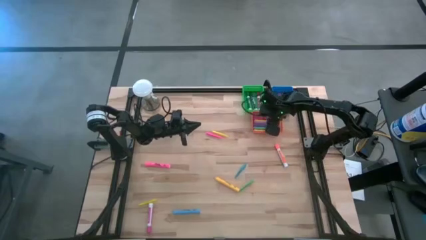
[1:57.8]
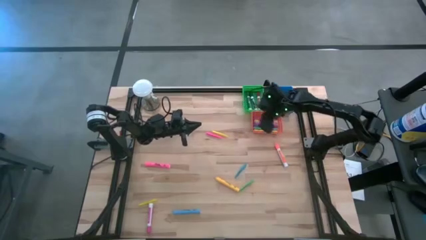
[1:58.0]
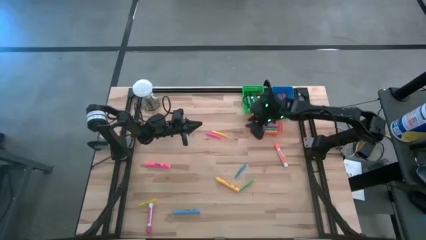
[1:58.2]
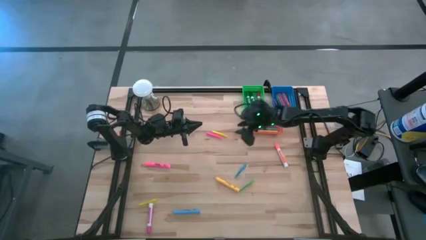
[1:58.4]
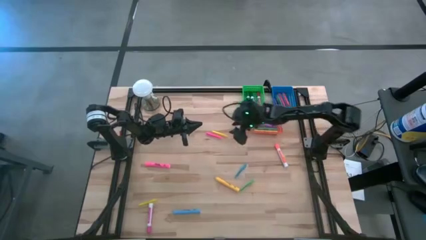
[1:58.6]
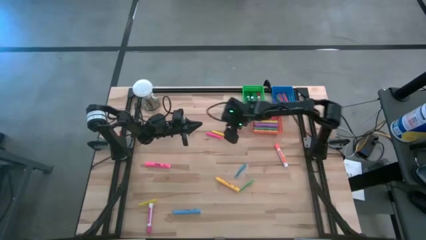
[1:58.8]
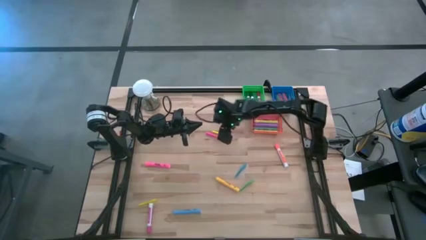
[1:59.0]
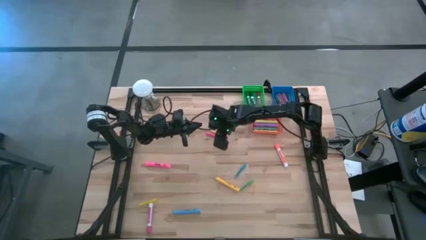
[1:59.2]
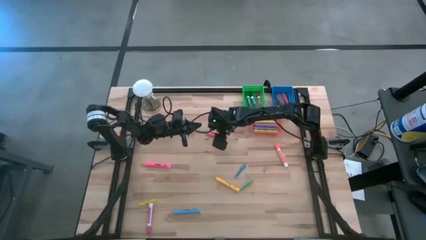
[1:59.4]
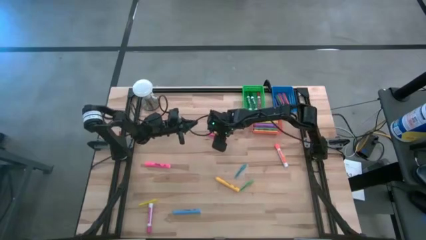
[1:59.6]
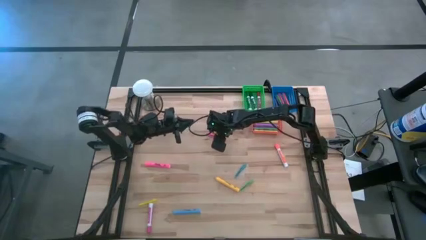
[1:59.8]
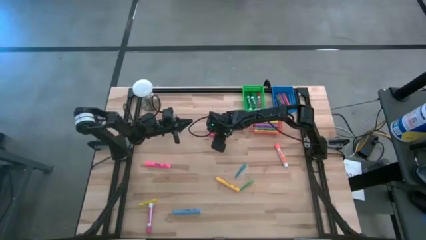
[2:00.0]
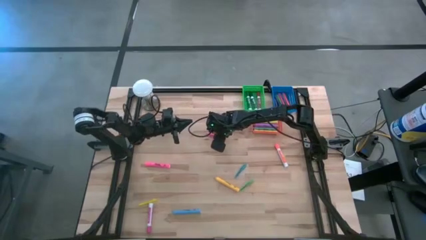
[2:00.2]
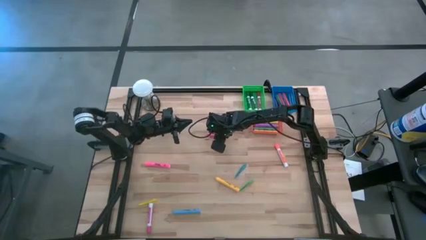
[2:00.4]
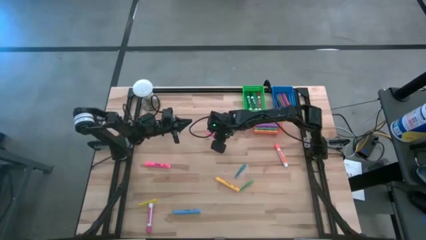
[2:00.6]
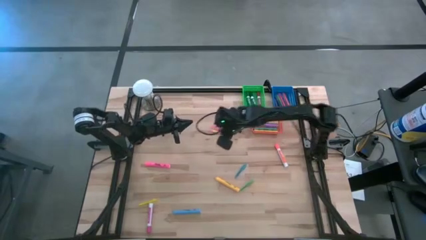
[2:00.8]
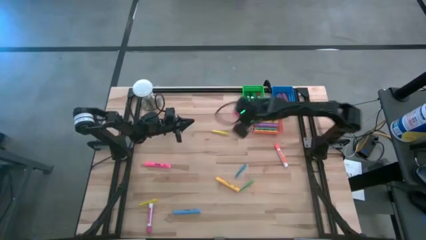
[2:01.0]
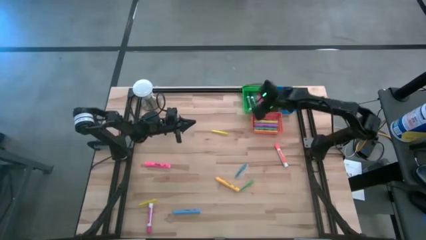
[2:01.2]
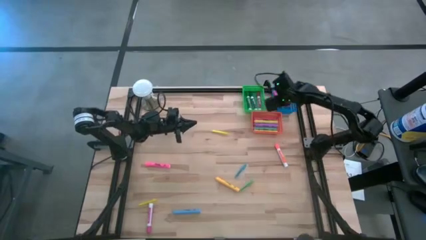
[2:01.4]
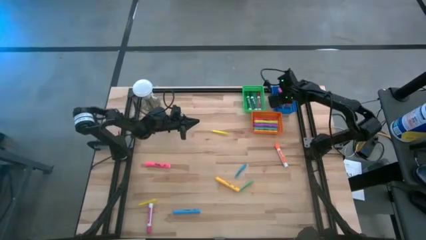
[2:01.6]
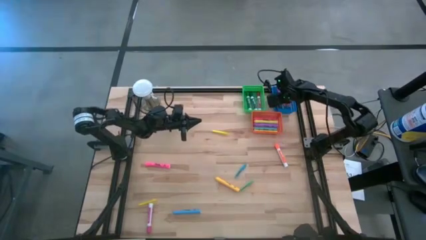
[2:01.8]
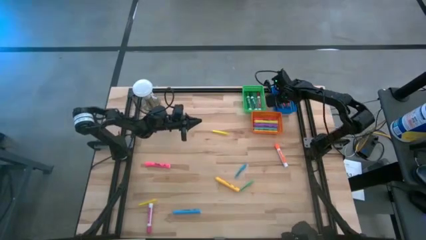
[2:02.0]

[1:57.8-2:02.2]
Task: Pick & Place Markers
Put the pink pen into the blue bin

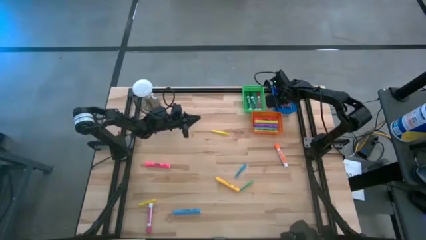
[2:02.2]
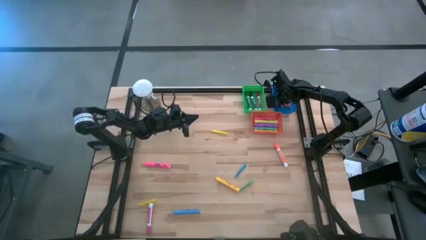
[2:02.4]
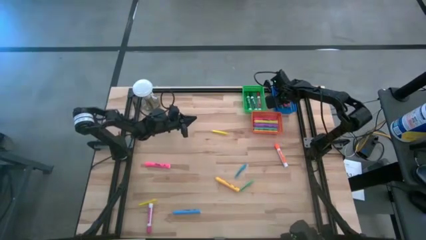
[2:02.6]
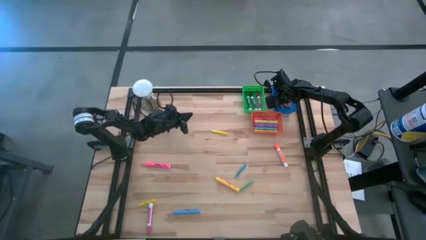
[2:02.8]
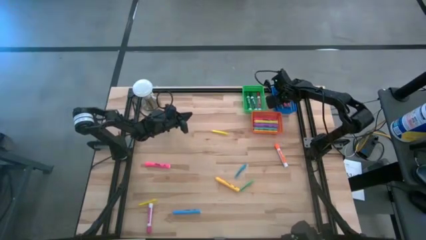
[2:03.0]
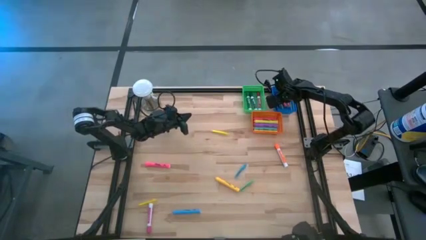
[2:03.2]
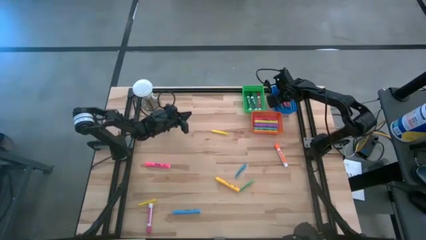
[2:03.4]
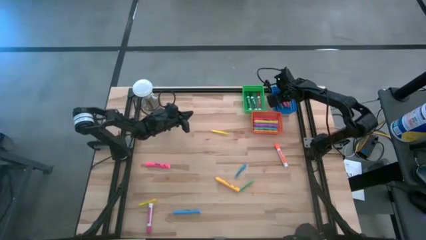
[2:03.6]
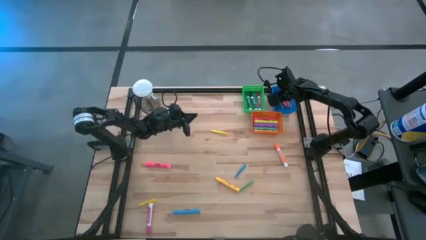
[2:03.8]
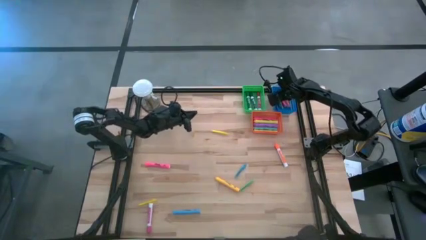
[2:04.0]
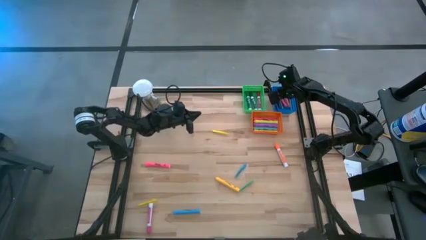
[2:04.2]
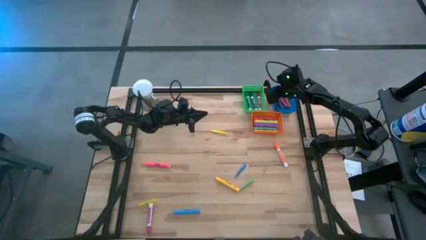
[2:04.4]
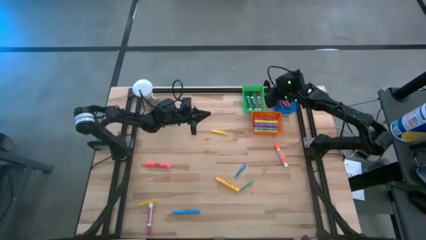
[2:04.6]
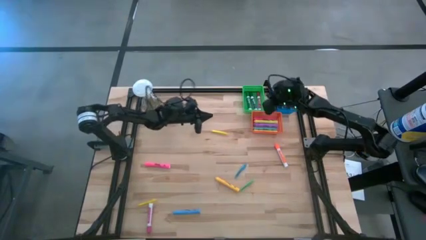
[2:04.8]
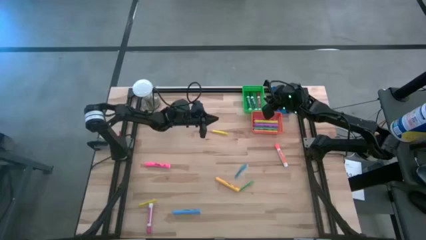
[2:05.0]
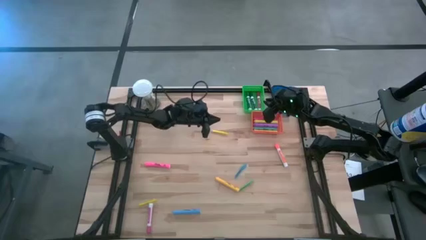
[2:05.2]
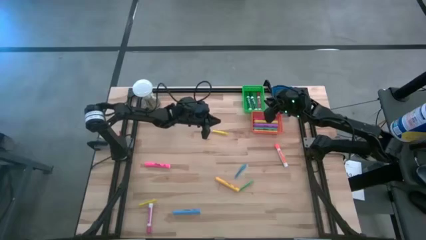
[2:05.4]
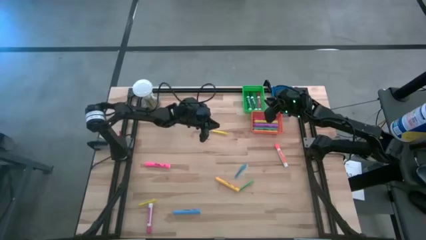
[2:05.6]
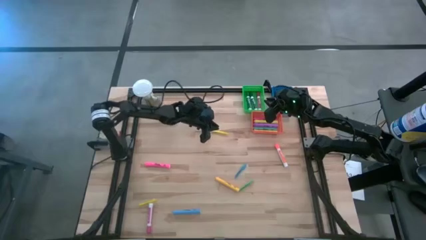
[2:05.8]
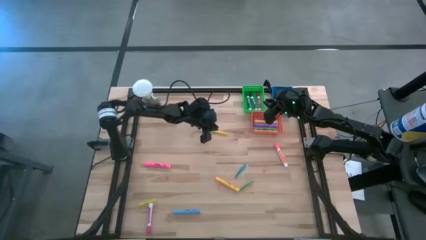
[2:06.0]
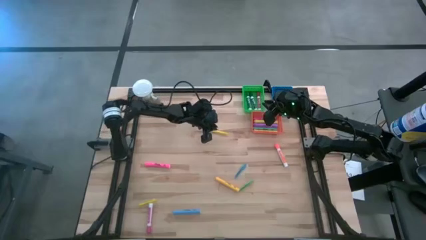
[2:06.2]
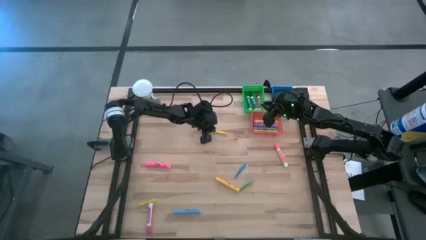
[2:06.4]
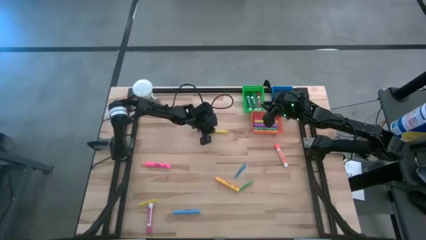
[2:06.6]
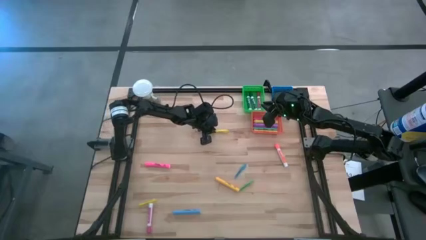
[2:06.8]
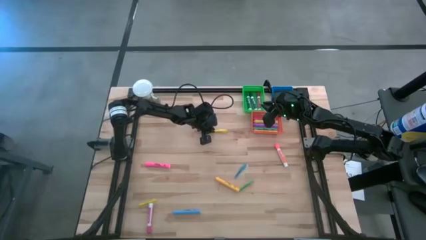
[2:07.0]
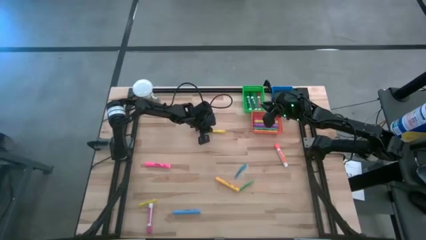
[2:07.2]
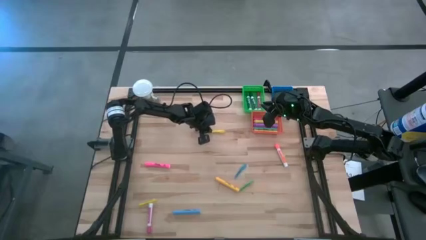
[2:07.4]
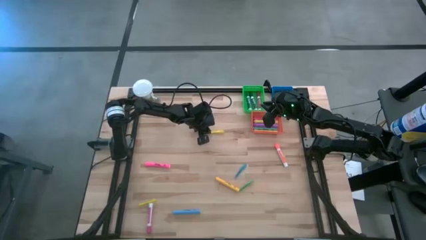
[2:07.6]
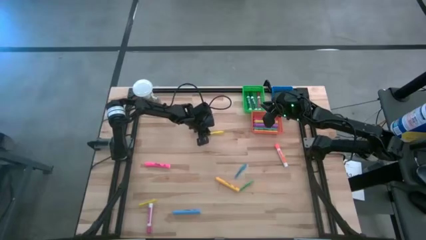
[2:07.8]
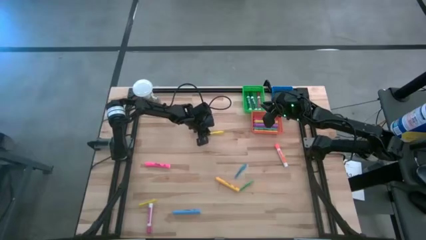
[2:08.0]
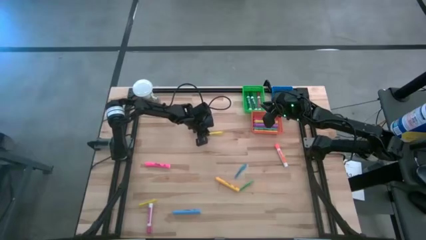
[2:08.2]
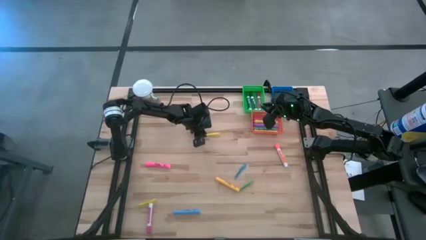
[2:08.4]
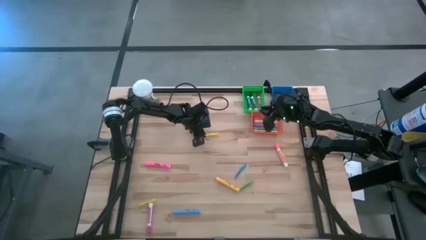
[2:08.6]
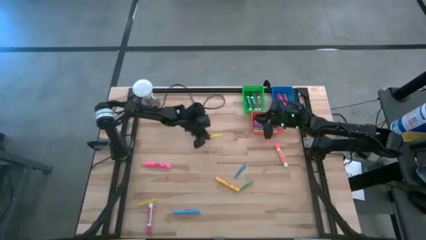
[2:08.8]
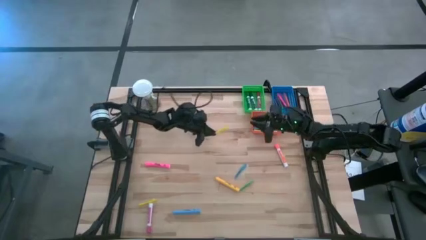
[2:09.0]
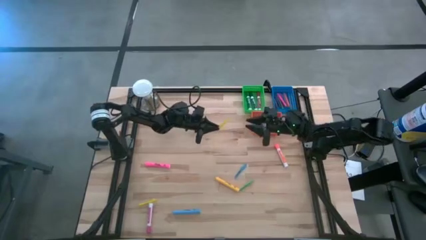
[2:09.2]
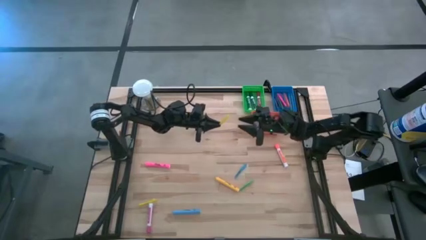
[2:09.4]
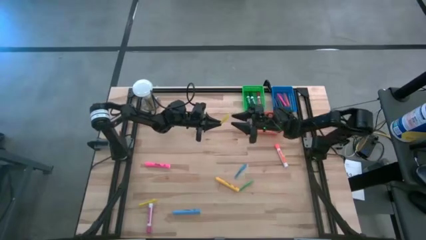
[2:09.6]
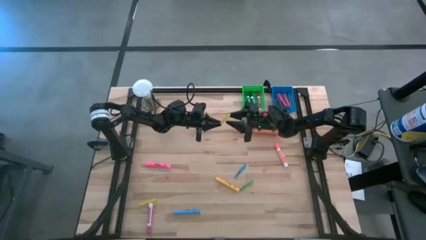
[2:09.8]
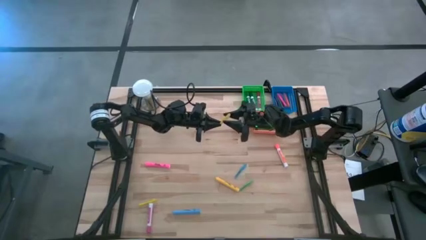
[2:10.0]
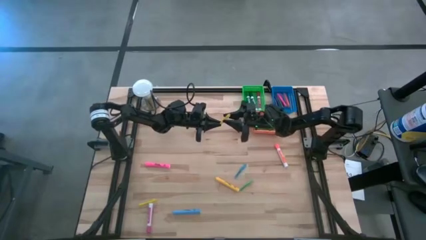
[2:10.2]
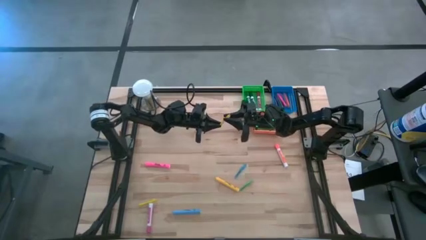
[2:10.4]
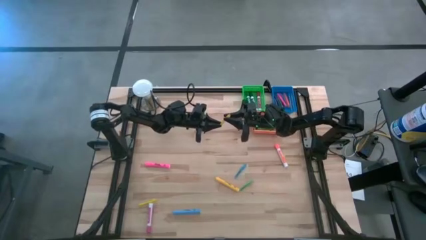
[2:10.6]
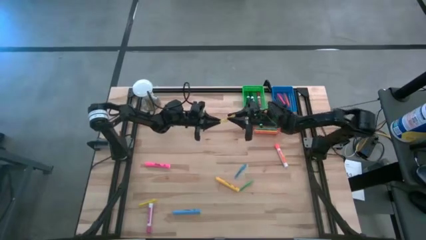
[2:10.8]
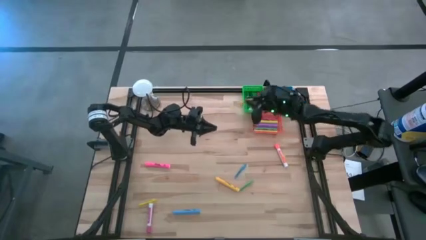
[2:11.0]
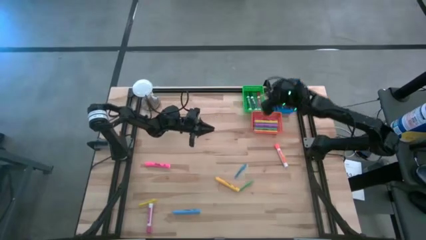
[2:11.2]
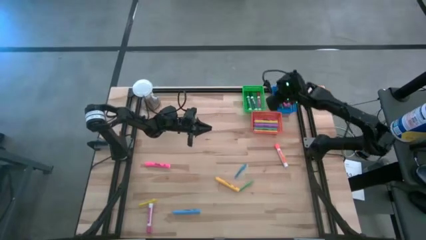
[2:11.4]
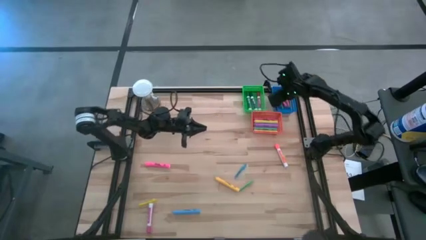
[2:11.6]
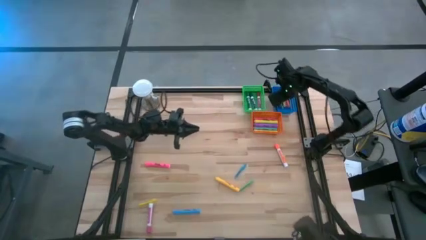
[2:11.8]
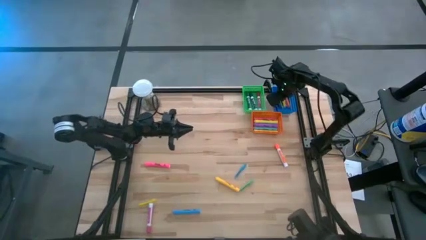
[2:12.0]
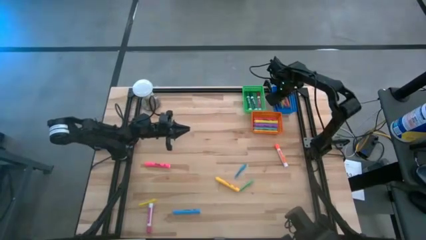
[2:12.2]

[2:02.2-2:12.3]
Put the top yellow pen into the blue bin

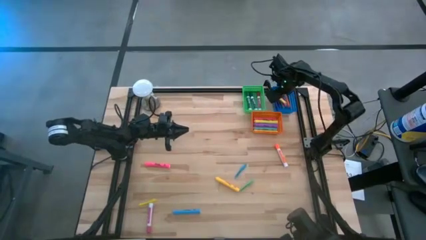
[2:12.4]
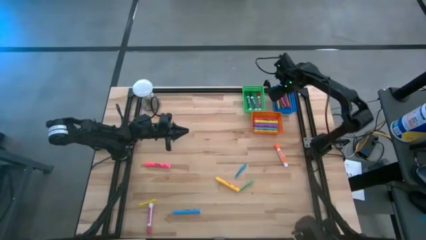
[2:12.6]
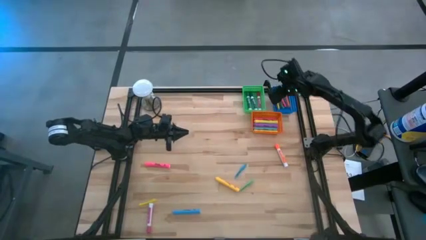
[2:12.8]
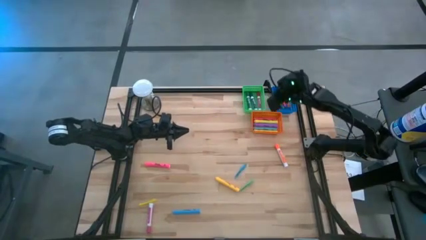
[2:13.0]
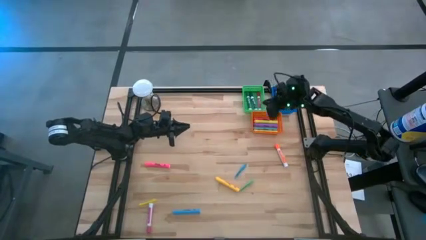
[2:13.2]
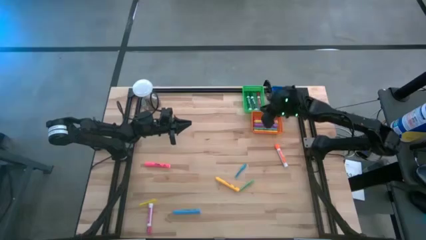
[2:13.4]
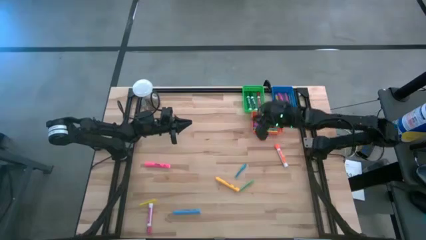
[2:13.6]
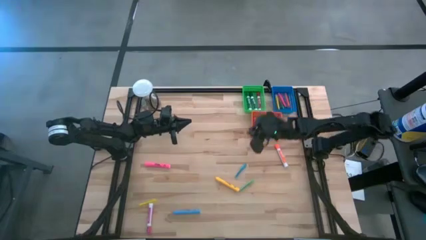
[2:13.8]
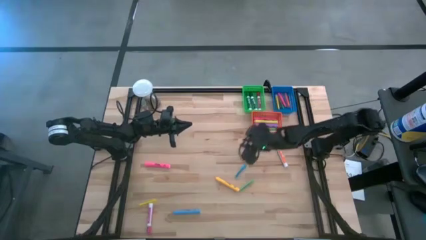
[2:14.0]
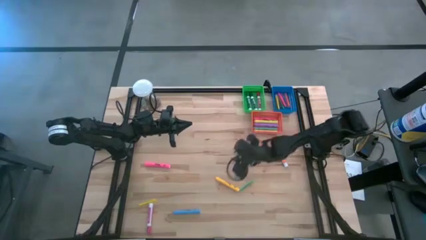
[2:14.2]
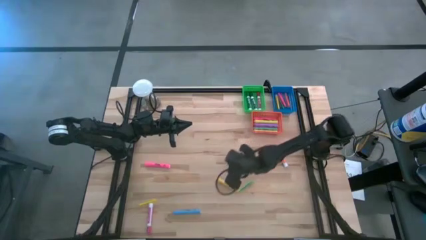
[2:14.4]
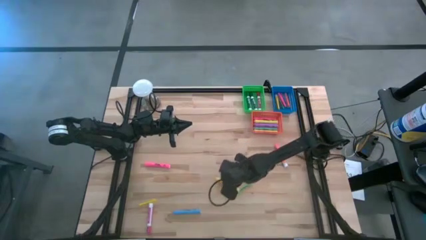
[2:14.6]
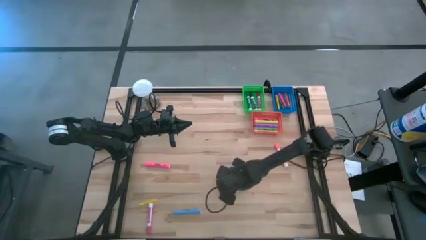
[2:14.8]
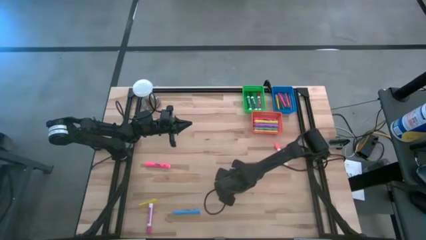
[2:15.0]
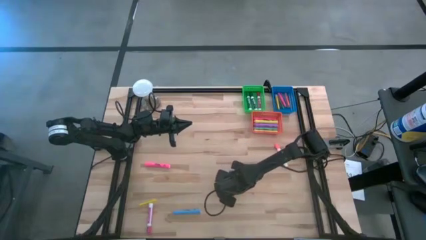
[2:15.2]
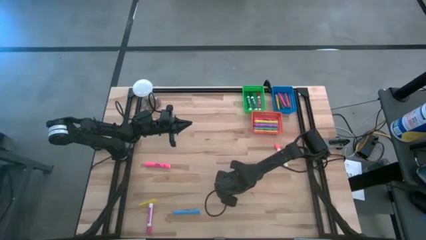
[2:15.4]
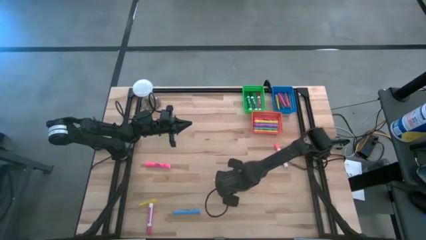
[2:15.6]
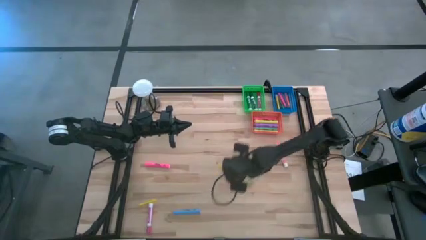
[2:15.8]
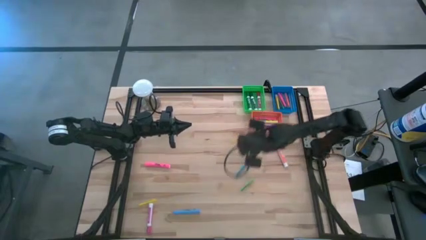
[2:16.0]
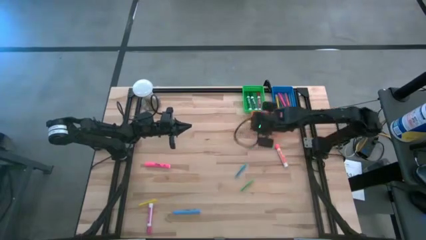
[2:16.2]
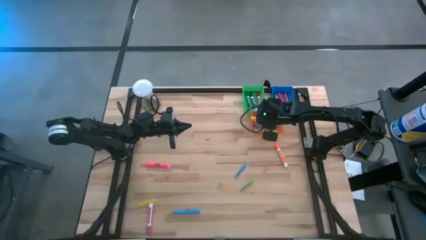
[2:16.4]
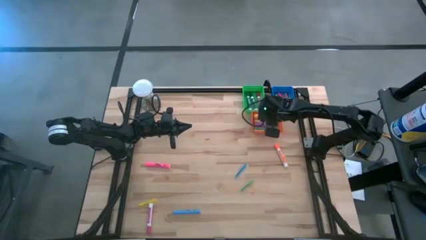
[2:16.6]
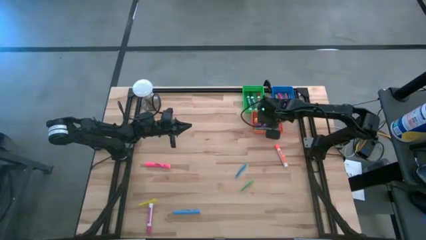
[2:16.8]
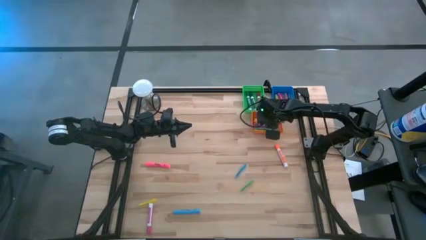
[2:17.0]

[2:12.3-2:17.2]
Put the dark yellow highlighter pen into the orange bin
